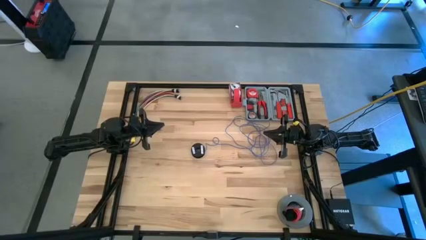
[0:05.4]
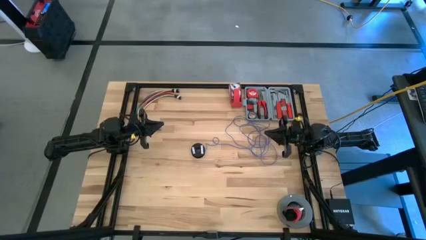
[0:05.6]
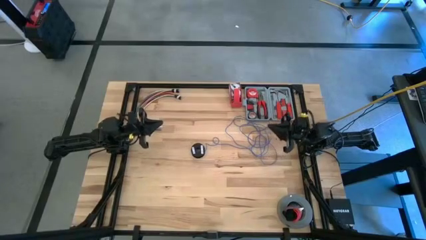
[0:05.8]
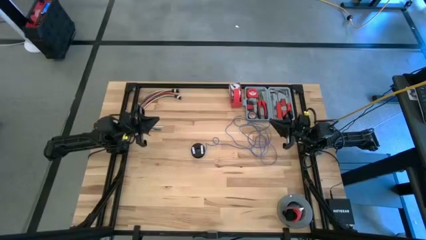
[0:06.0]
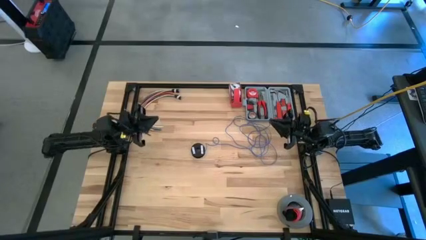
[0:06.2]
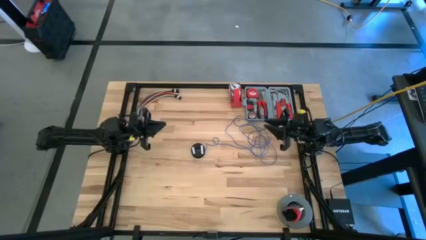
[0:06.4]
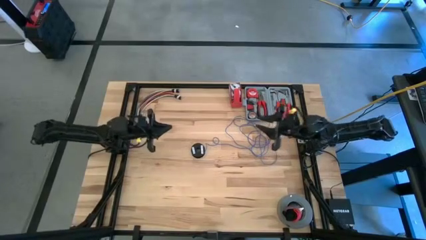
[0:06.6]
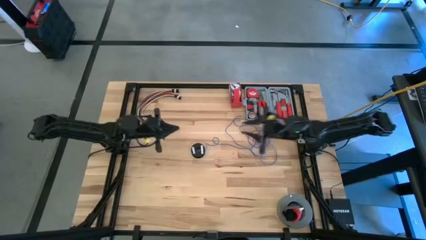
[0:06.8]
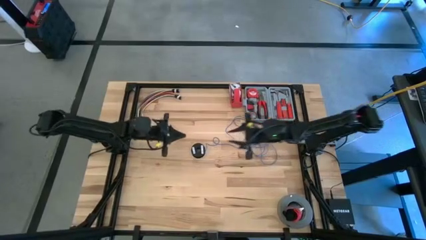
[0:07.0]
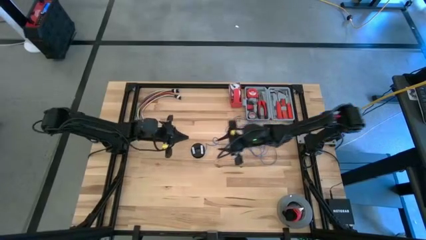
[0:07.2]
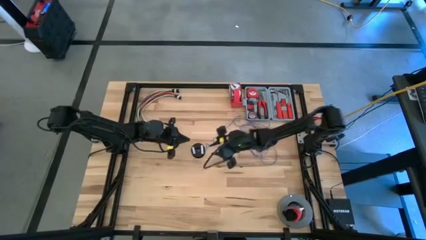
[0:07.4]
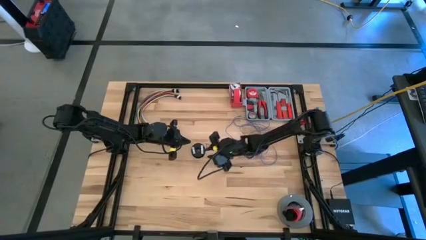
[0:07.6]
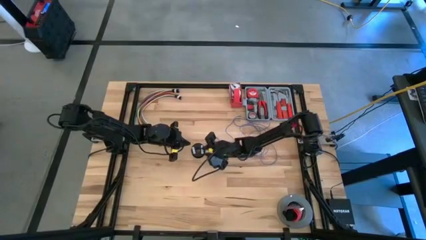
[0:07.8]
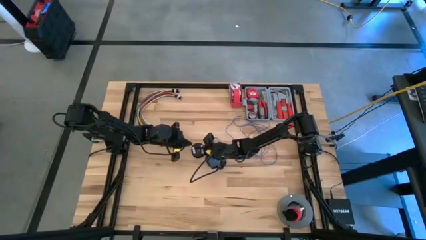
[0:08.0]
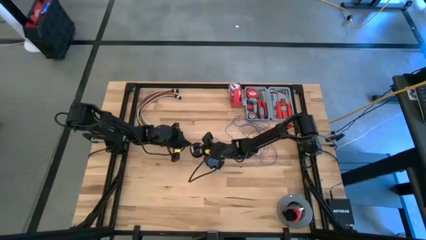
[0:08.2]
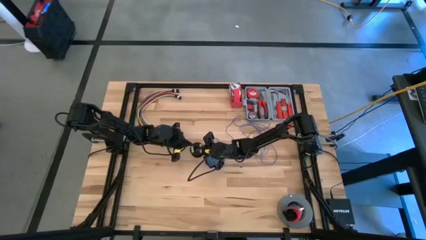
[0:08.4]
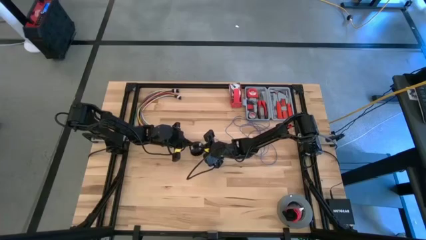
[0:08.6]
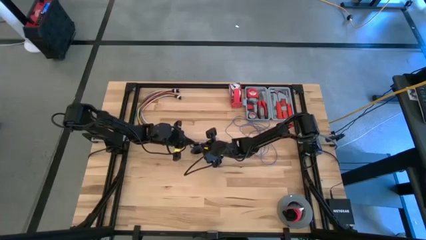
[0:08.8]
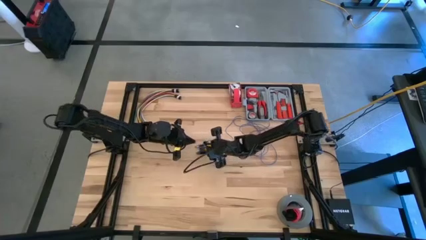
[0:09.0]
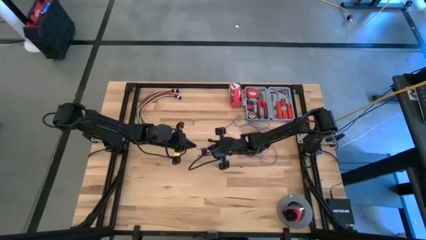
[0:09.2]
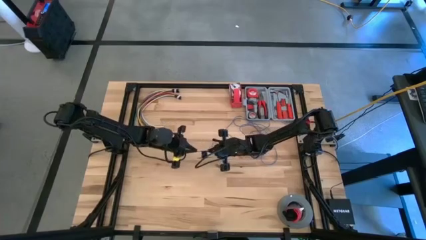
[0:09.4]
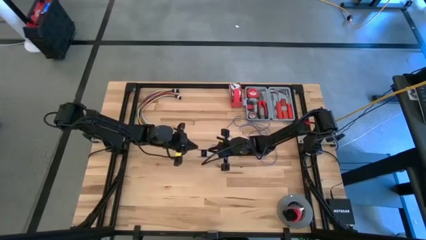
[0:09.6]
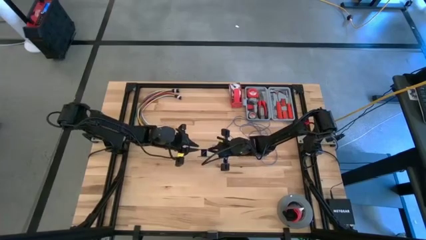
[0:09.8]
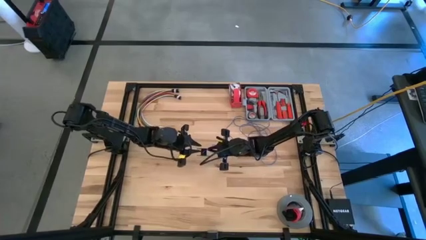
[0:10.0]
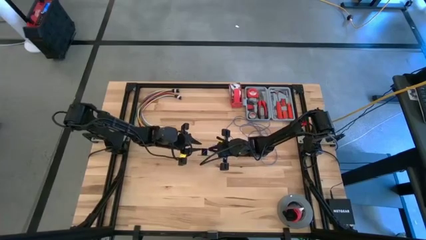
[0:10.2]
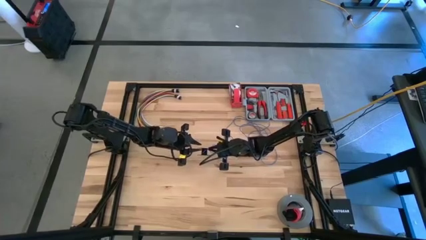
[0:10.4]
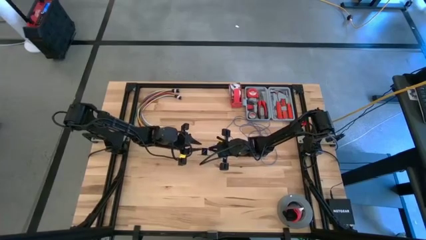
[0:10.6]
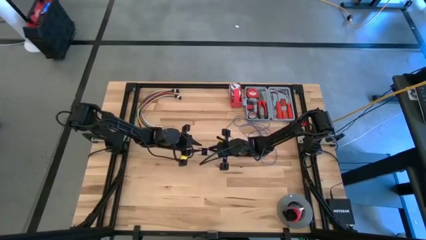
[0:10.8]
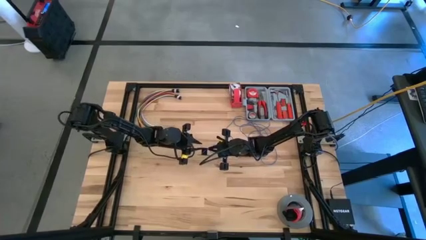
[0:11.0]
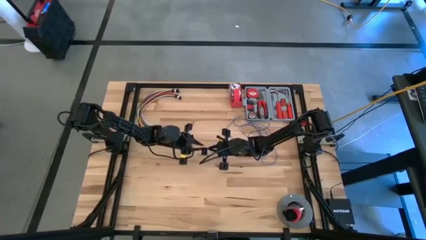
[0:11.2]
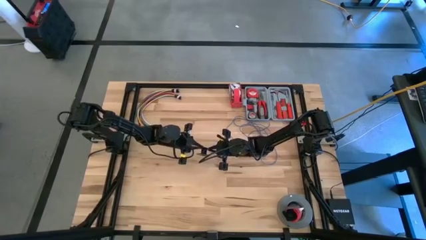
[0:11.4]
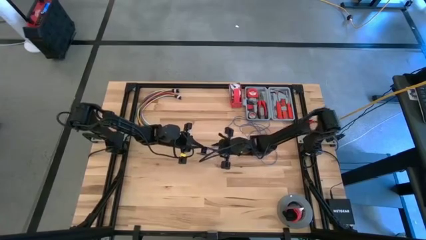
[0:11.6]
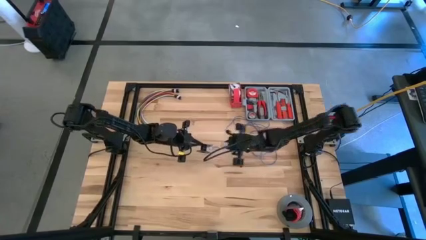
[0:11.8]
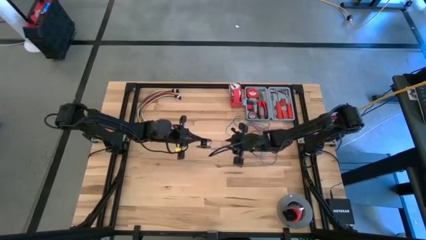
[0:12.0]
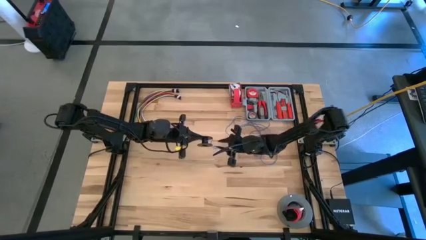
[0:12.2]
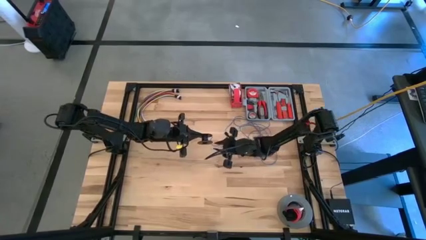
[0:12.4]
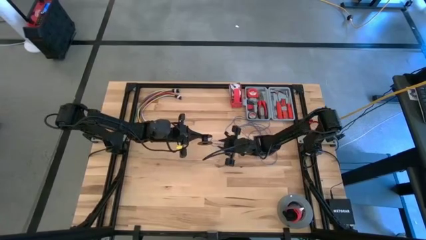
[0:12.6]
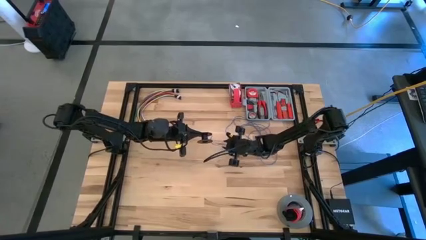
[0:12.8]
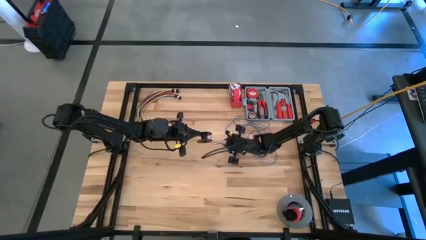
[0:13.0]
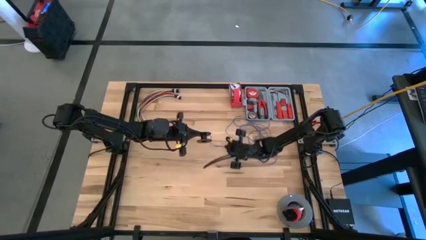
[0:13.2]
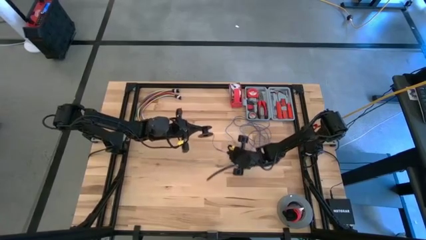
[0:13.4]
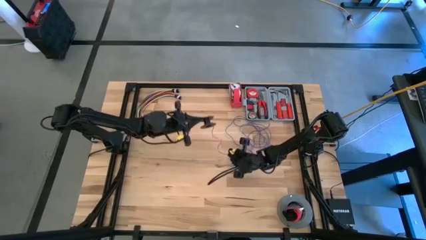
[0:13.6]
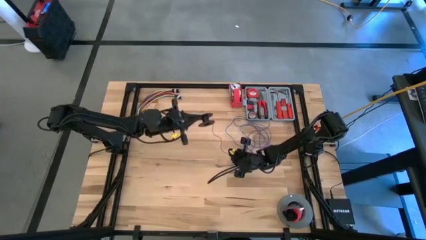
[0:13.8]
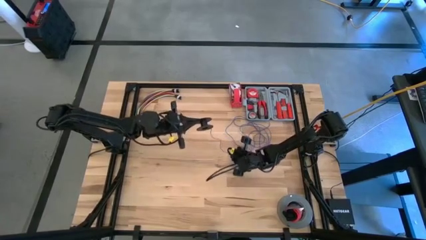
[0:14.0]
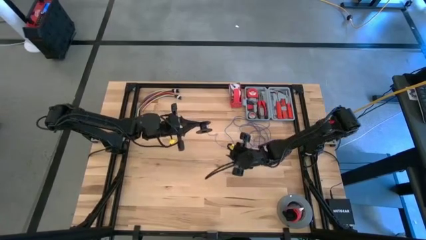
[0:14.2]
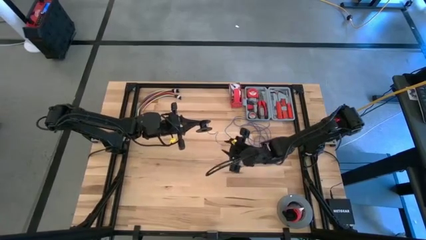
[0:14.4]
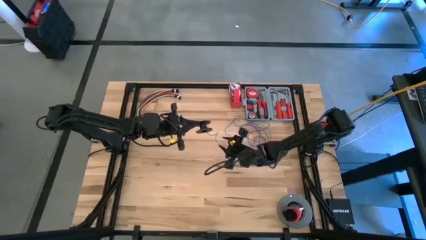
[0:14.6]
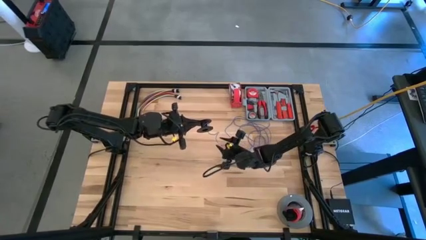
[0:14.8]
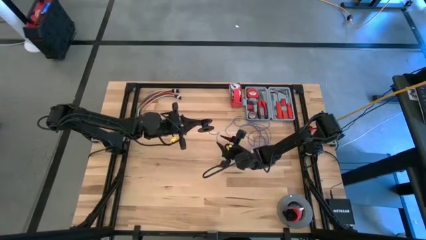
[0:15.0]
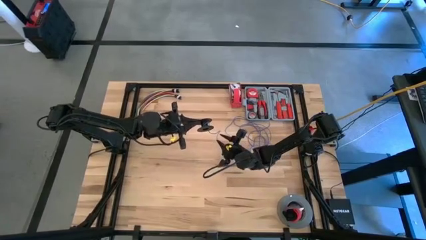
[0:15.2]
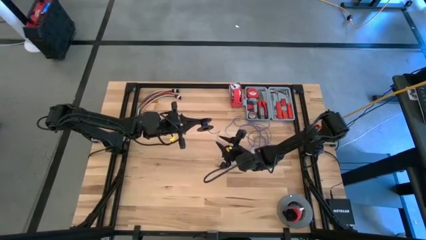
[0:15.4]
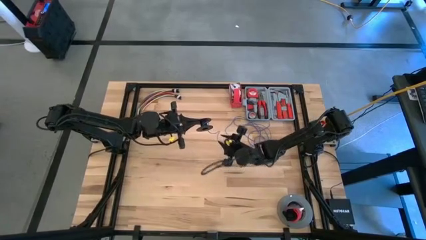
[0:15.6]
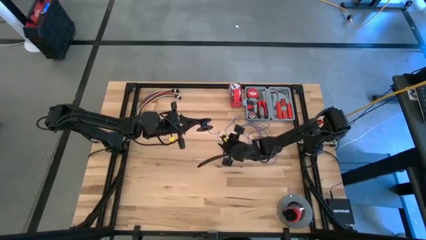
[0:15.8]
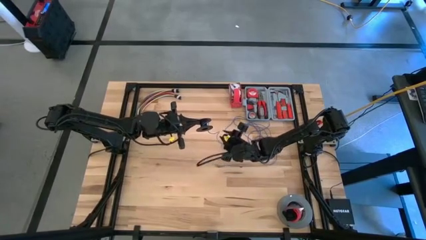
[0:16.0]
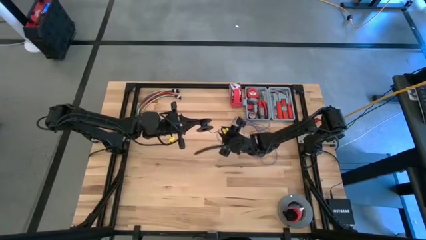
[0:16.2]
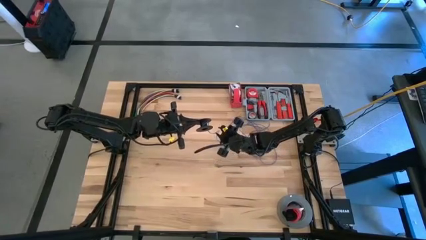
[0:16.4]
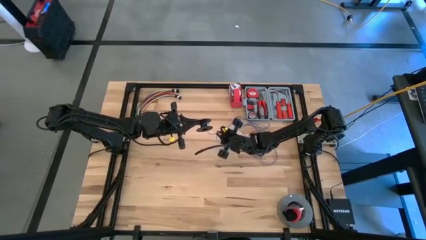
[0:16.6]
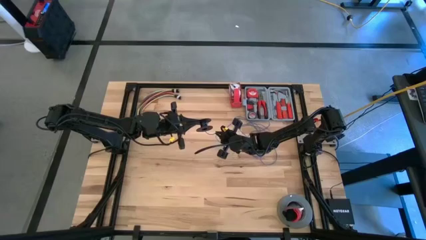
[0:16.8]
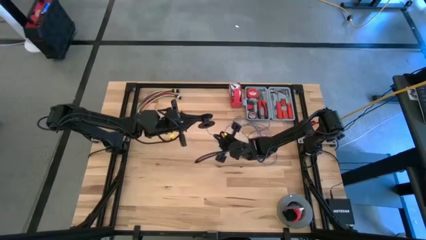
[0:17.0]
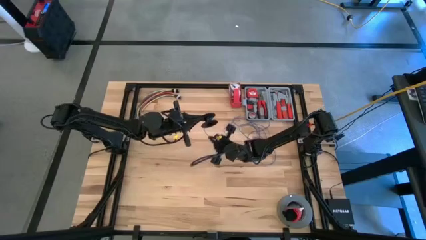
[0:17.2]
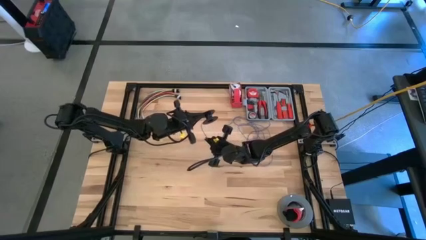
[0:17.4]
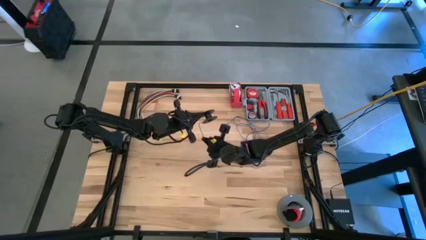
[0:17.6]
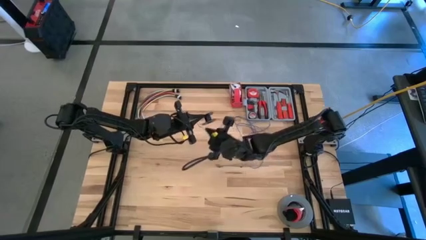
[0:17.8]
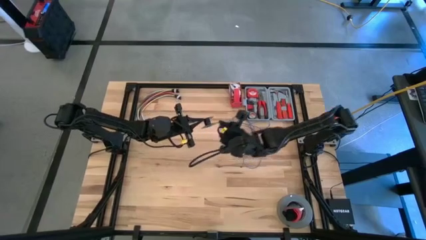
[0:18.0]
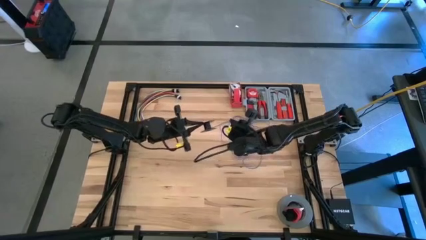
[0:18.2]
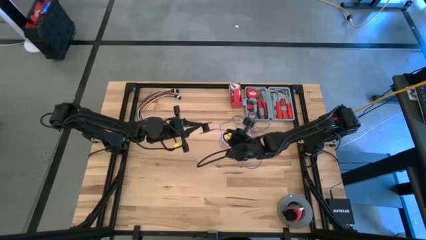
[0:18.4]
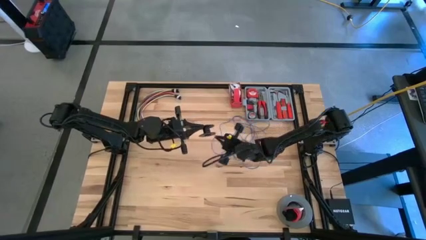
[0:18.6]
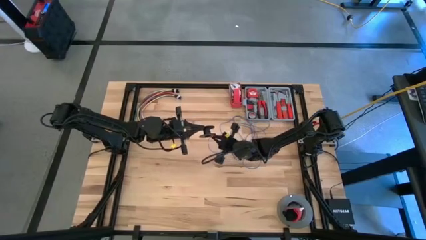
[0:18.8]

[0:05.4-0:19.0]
Task: Coil cords
Coil the blue wire on the black spool

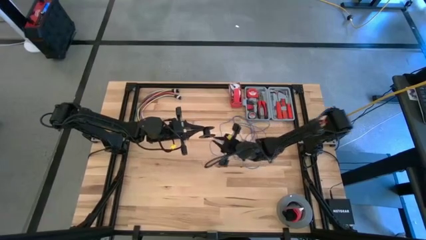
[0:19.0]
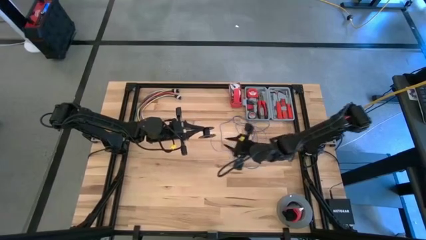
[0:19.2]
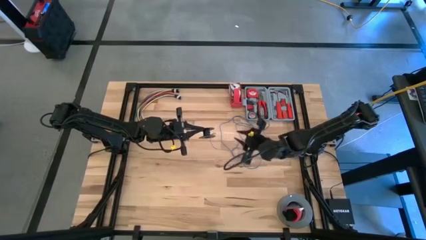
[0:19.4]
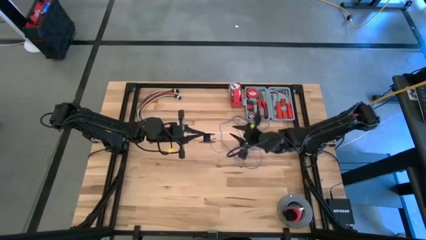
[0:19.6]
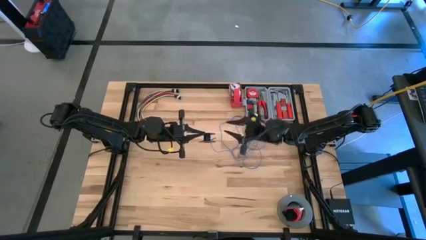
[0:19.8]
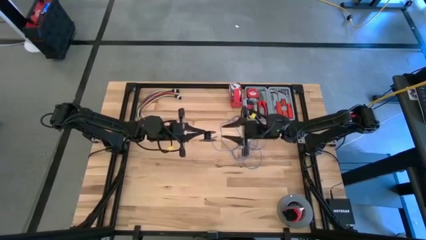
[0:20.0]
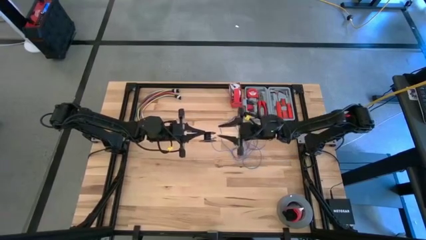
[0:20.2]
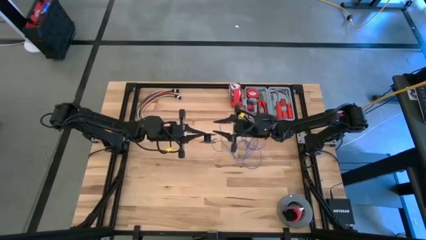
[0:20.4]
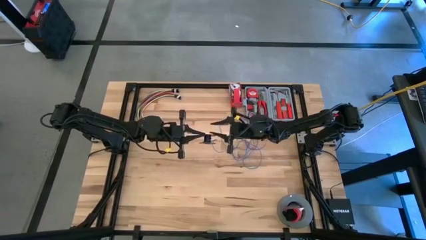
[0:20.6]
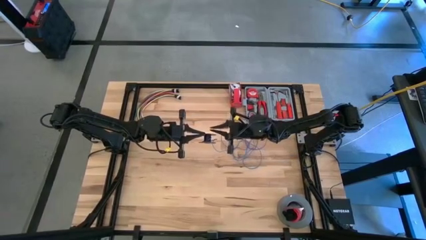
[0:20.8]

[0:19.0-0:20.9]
Coil the blue wire on the black spool

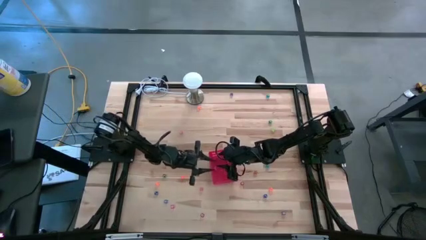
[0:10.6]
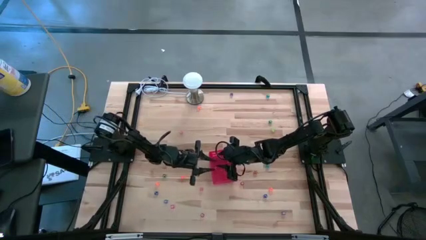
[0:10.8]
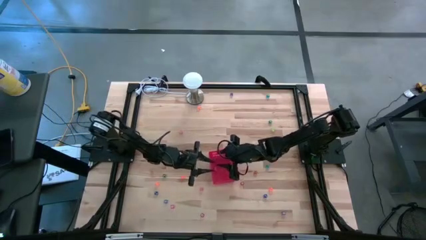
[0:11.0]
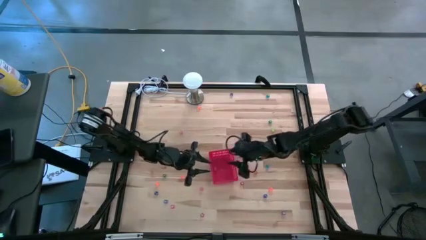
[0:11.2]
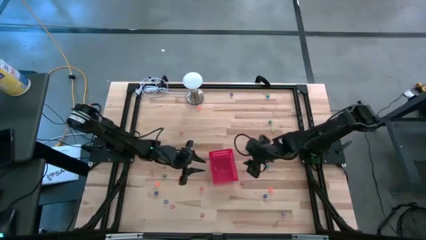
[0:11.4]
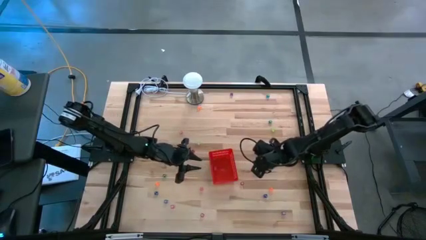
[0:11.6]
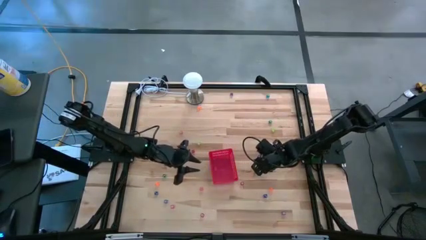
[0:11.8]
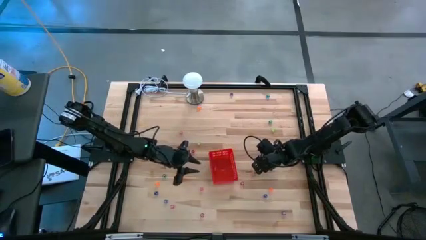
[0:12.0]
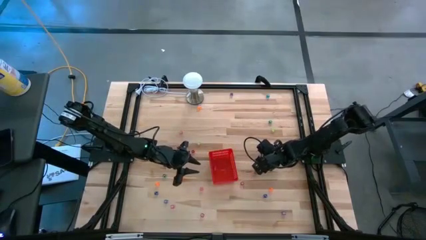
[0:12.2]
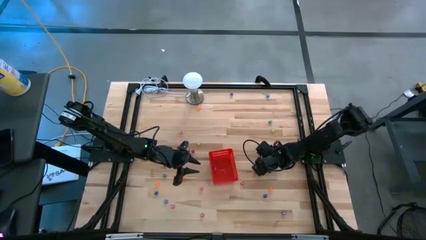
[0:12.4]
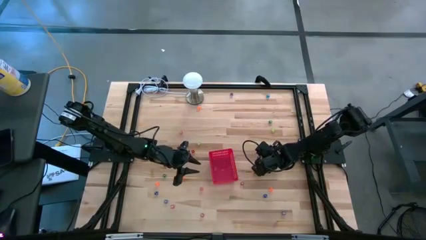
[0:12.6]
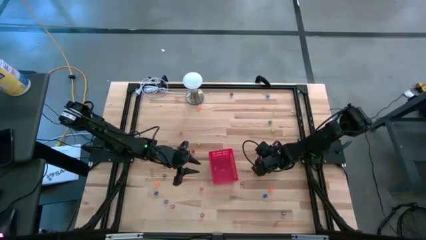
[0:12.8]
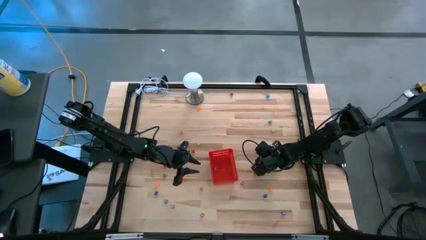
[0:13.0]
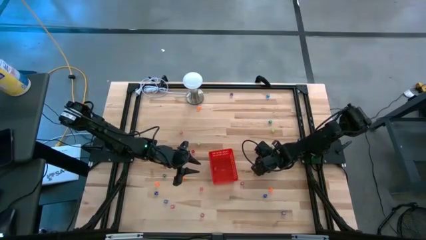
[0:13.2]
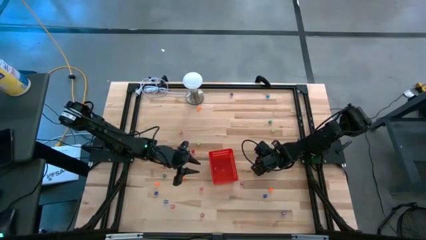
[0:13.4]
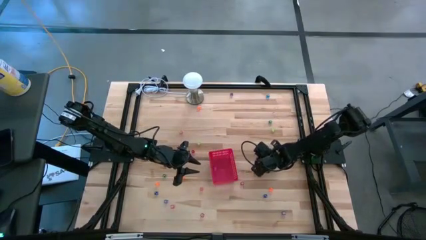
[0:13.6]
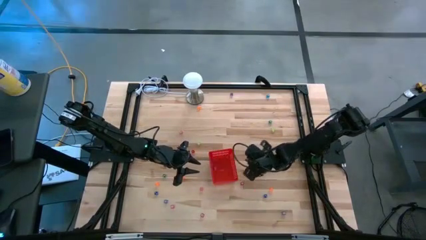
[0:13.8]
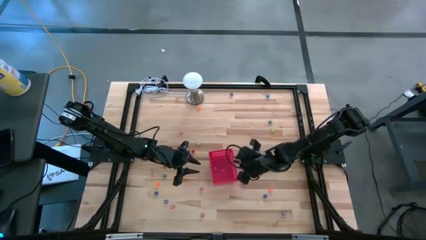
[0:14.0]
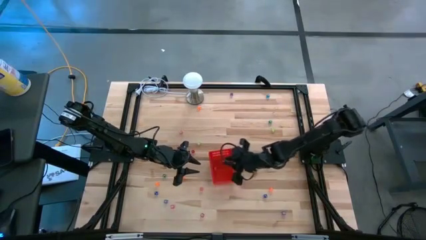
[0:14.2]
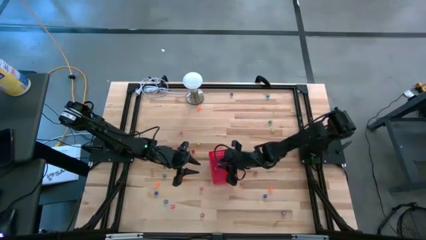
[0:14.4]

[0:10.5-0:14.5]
Task: Pick & Place Dice
Put the purple die into the red basket
